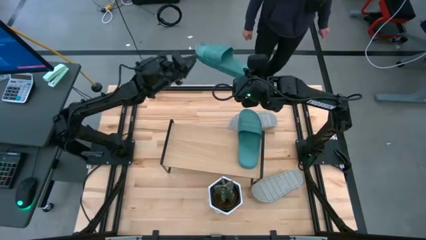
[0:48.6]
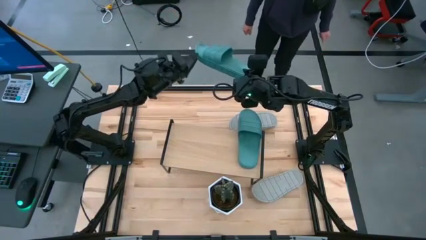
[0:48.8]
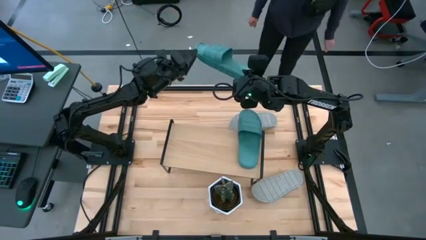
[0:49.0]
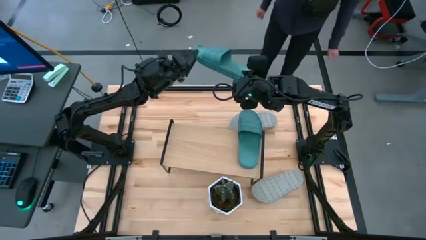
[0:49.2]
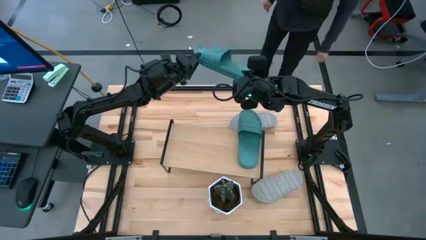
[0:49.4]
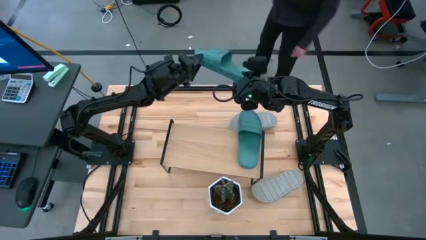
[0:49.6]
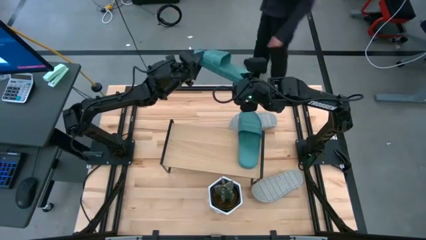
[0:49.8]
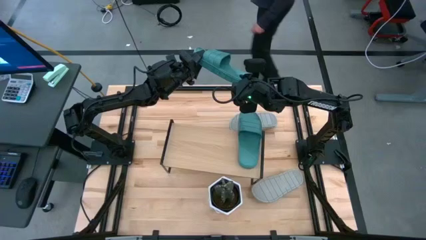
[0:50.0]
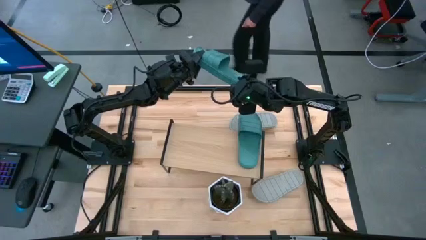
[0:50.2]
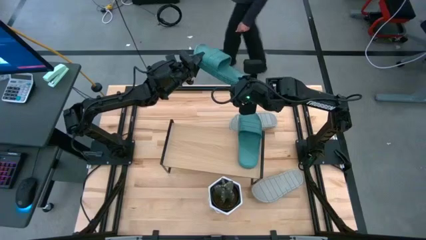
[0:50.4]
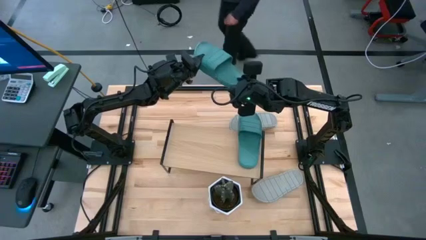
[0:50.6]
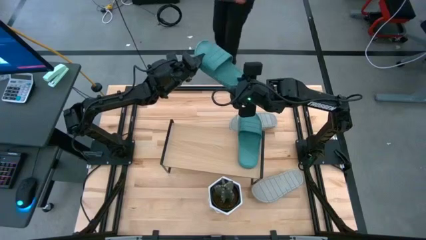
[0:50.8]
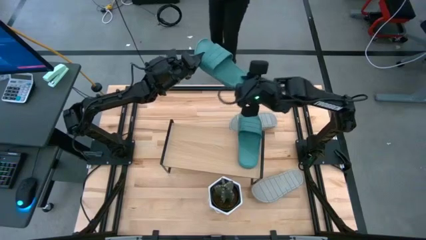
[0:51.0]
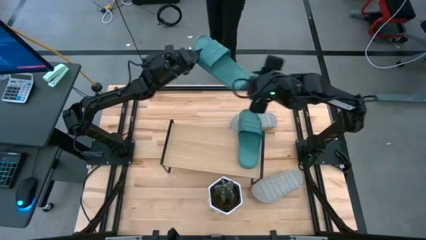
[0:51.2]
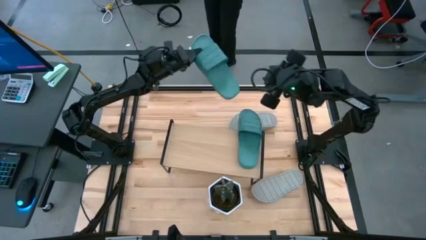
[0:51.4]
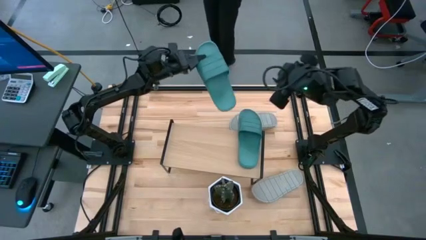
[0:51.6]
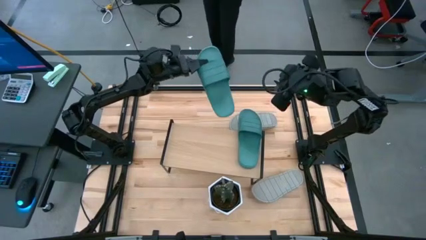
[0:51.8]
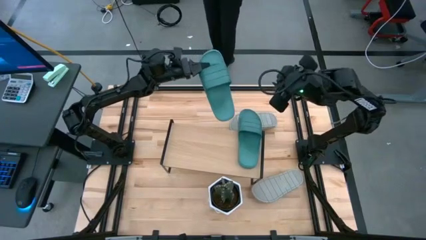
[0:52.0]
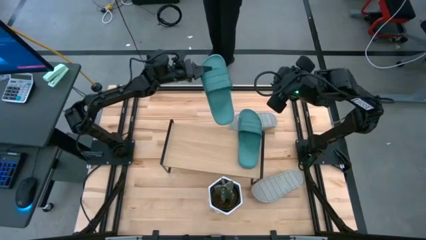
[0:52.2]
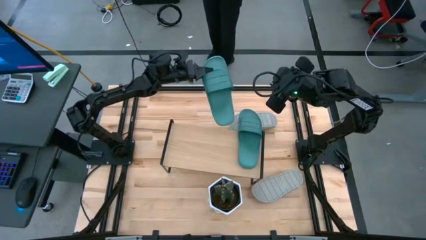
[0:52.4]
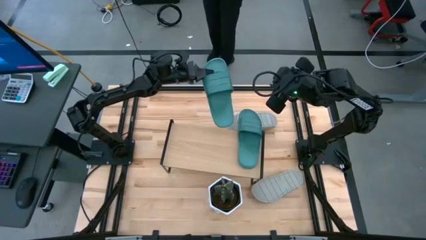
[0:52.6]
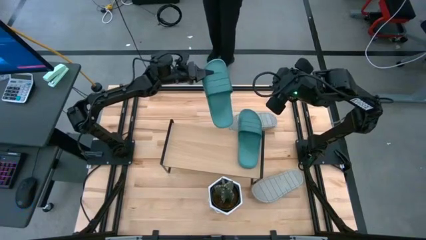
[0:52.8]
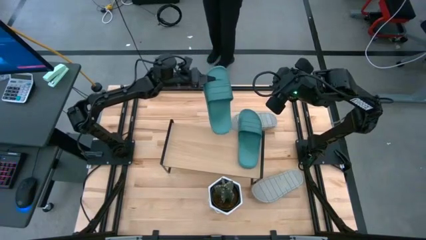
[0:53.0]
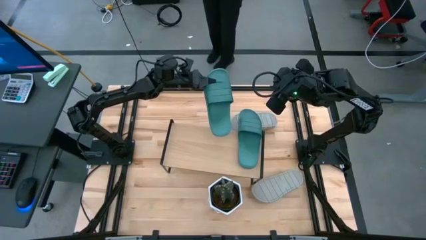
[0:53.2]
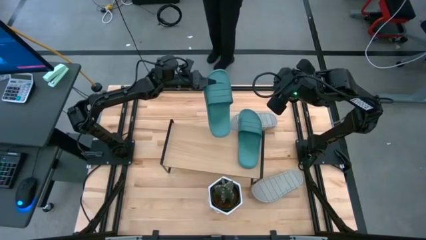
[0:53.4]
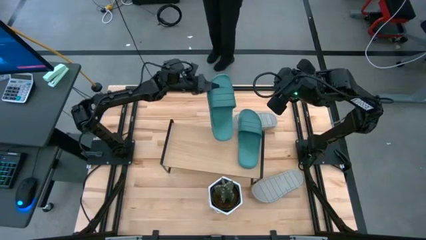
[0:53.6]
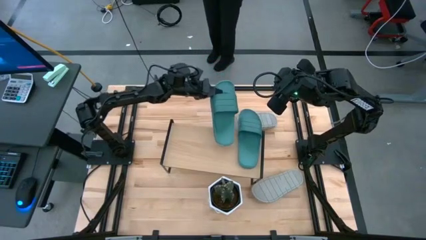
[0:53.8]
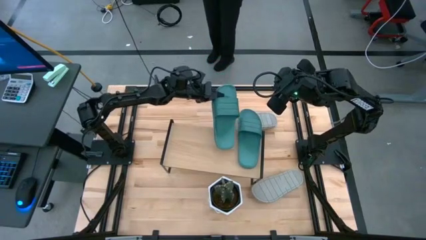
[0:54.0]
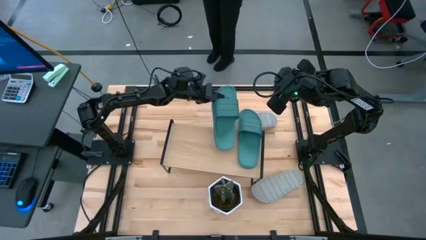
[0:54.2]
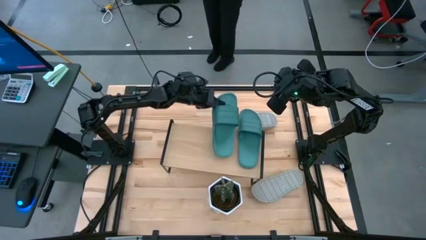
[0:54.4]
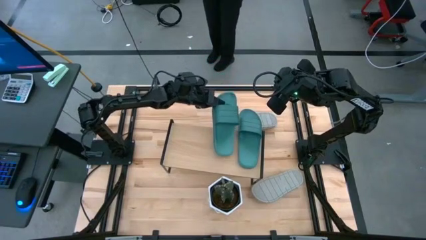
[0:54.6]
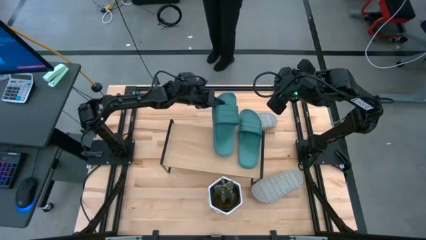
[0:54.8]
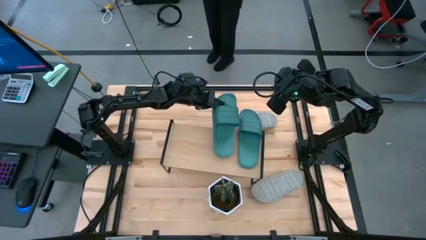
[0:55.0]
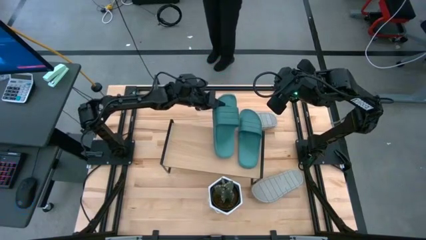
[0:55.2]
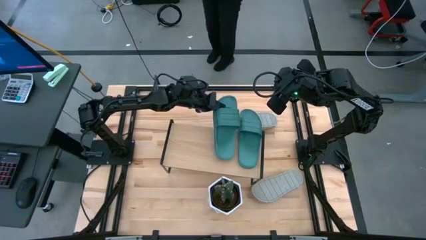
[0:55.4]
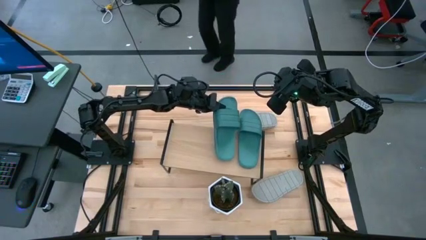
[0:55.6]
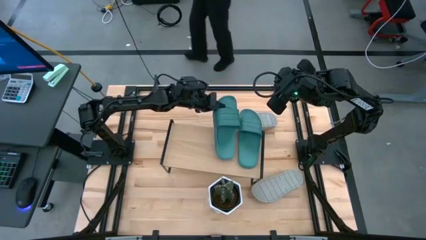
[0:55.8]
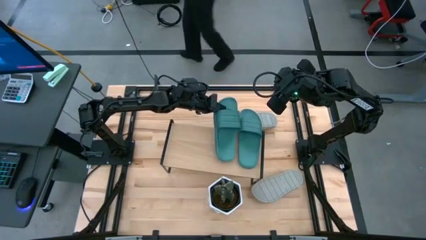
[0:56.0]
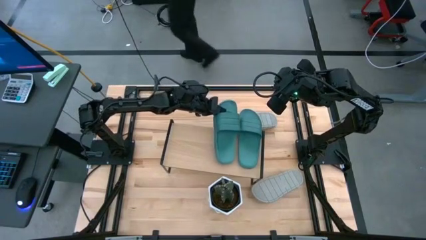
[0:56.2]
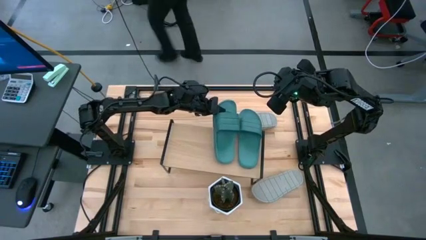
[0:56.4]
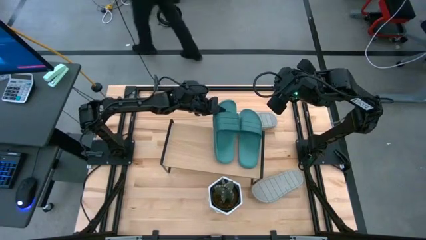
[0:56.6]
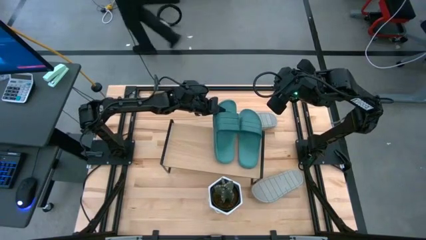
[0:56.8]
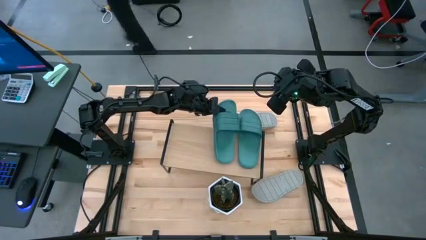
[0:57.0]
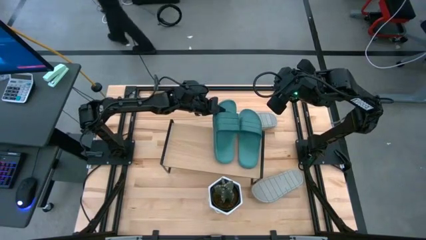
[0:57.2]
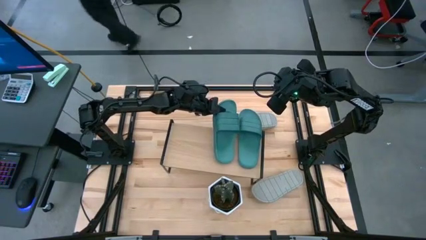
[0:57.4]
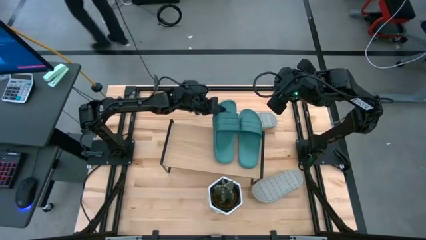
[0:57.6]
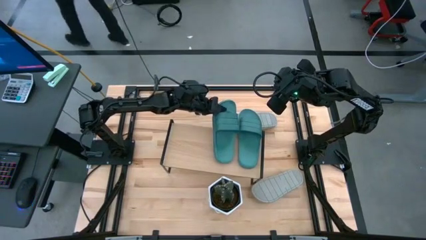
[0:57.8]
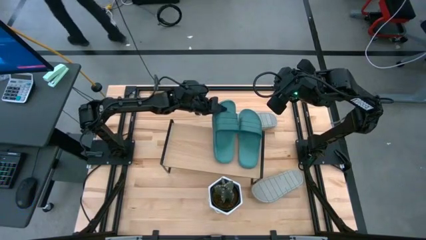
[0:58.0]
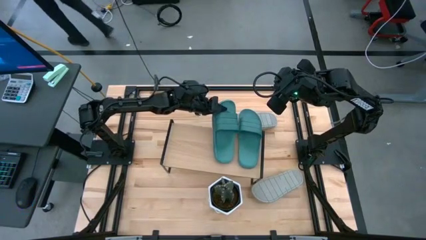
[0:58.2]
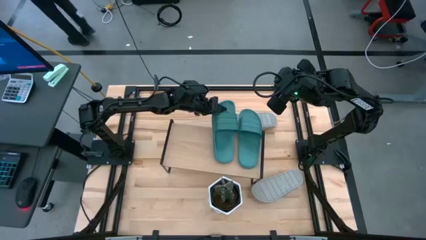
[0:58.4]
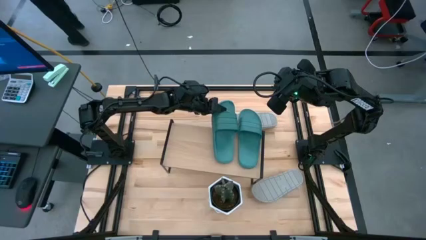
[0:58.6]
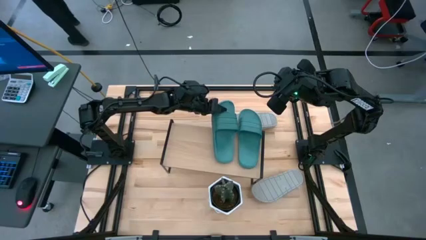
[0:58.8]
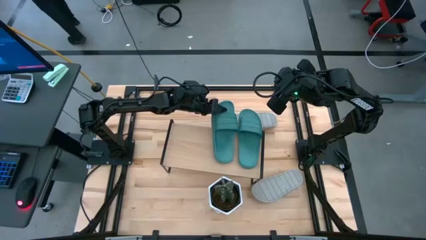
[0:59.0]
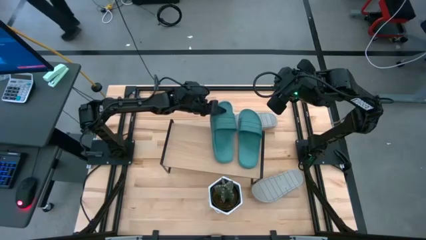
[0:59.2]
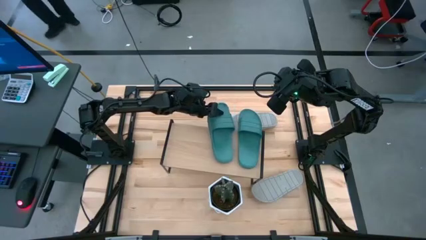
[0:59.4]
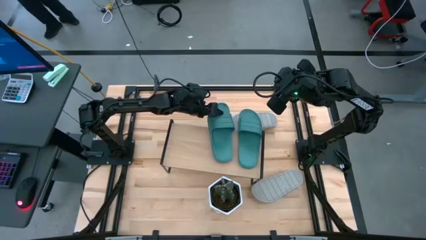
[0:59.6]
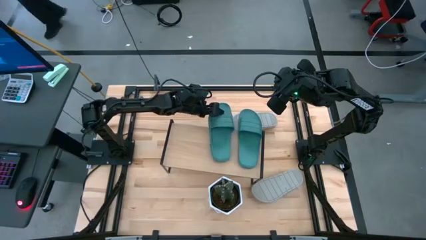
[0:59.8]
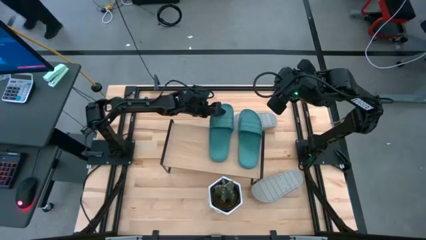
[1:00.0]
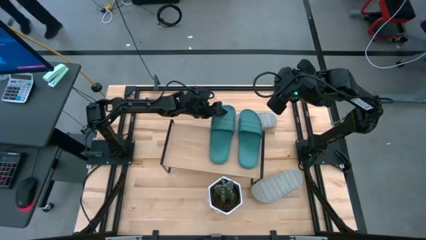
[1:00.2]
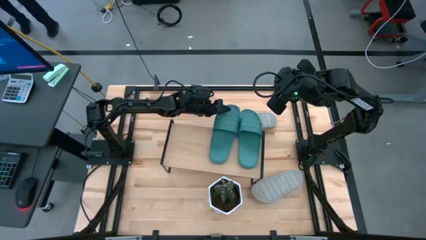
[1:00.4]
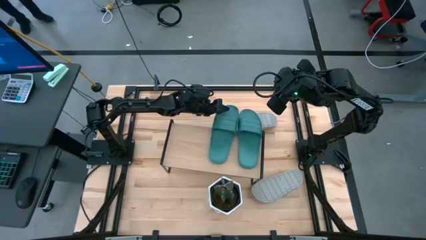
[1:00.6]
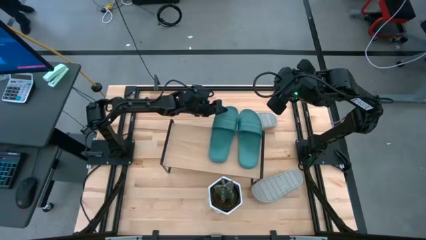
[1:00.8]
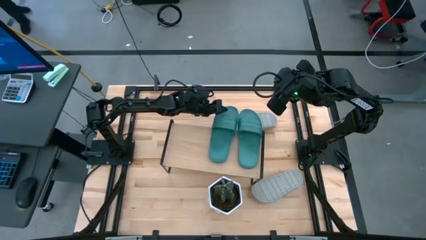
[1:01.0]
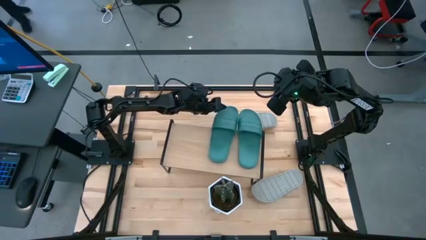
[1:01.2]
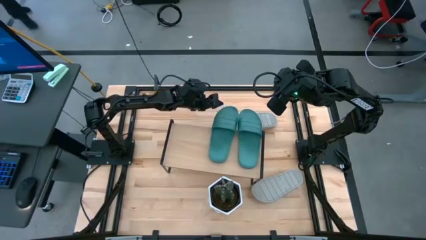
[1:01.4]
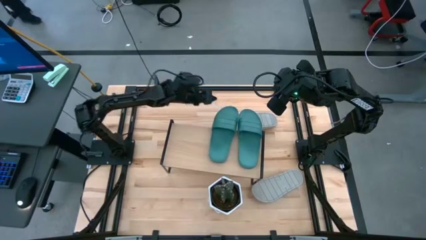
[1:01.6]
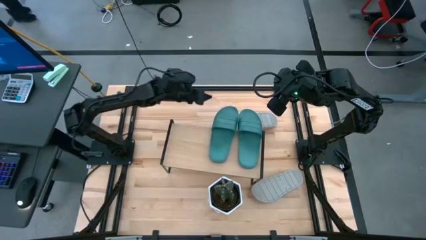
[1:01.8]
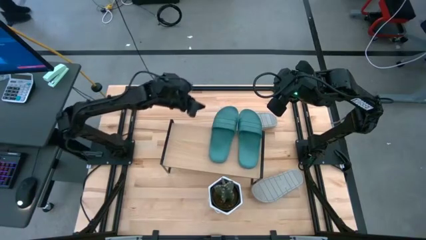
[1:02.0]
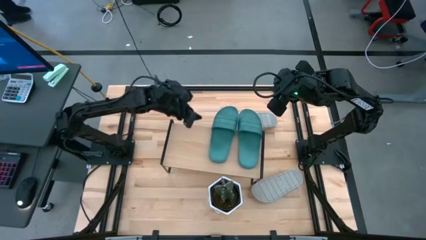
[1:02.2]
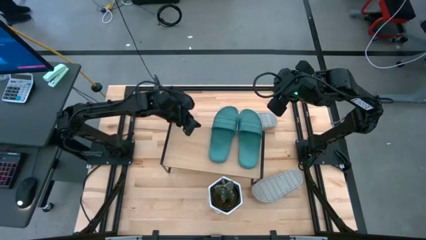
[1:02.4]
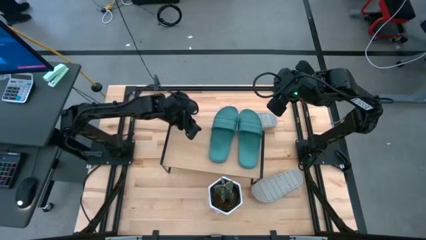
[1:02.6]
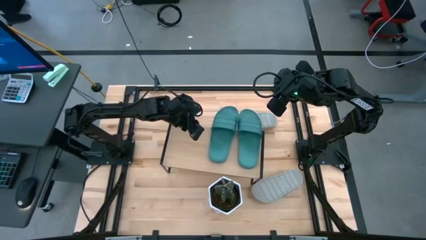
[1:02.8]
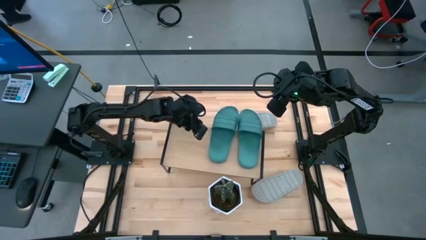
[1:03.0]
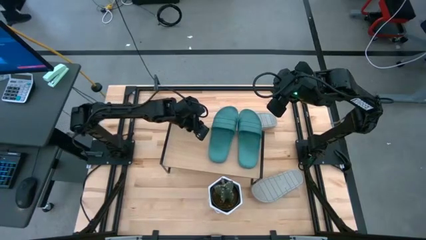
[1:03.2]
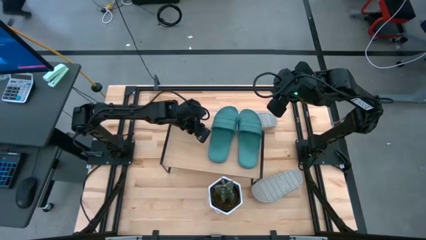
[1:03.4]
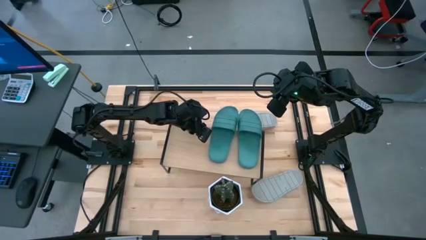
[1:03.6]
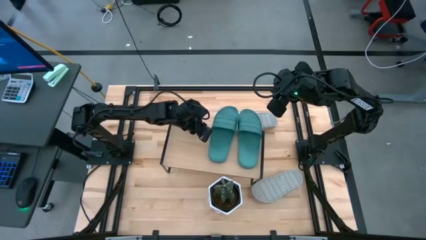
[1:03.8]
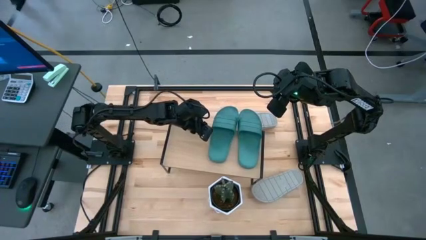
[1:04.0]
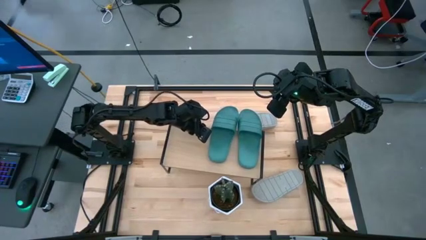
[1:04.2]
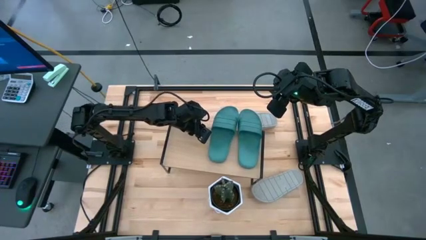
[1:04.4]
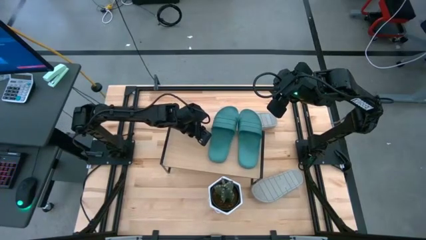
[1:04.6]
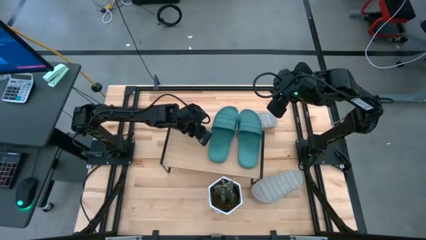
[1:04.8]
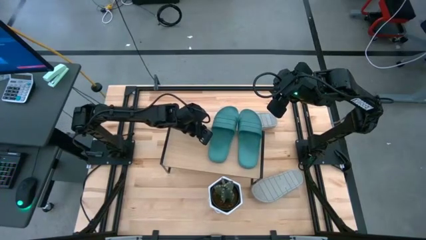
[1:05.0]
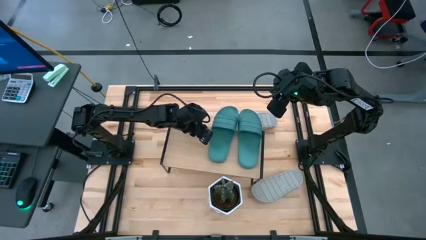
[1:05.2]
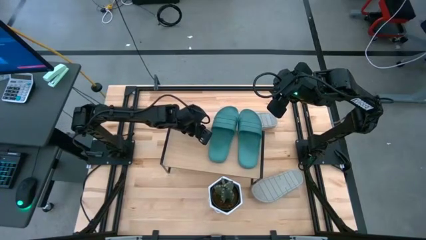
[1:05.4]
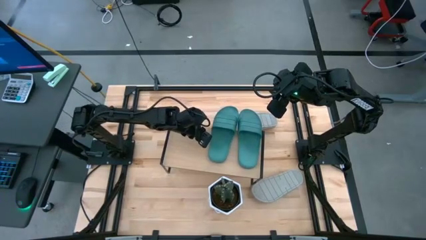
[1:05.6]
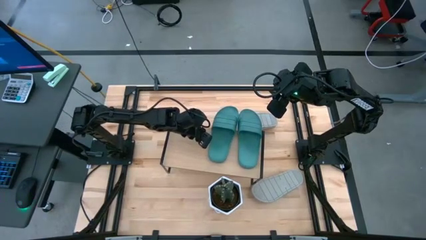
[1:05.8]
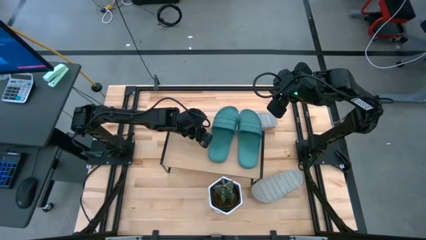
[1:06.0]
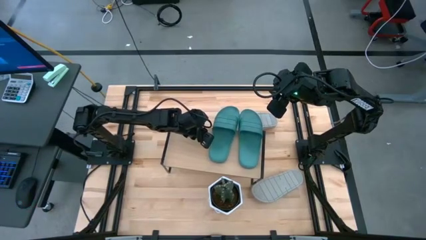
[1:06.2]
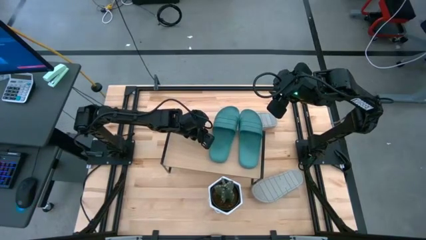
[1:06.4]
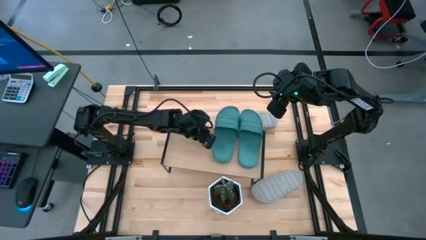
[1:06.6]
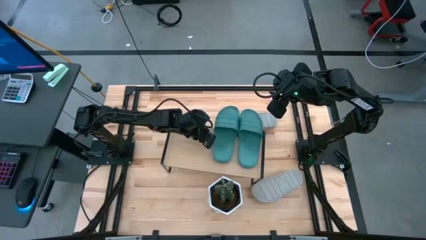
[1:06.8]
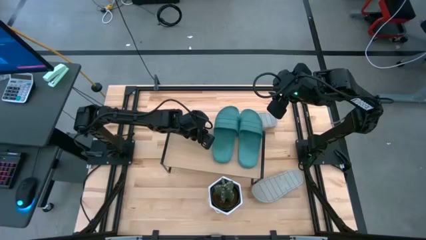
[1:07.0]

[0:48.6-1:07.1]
Task: Pick and place slides into the shelf
Put the green slide on the shelf
